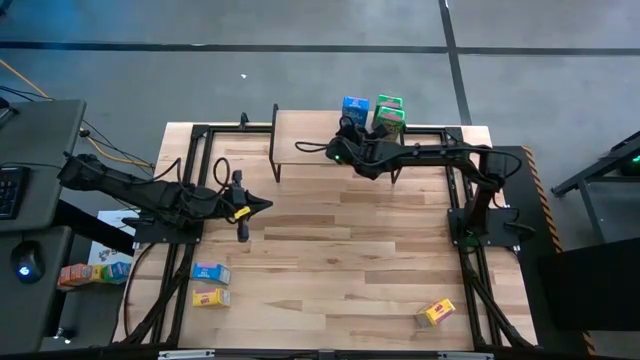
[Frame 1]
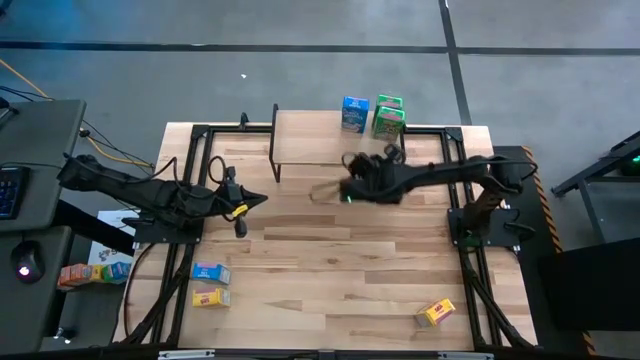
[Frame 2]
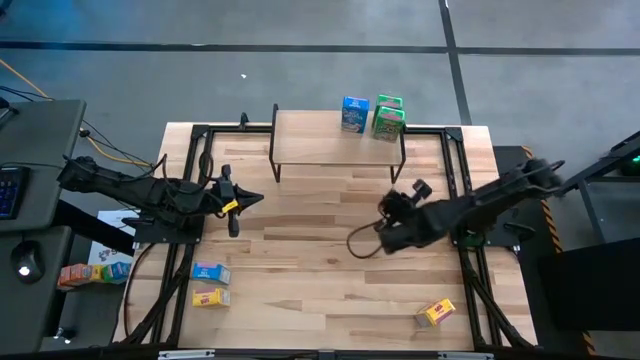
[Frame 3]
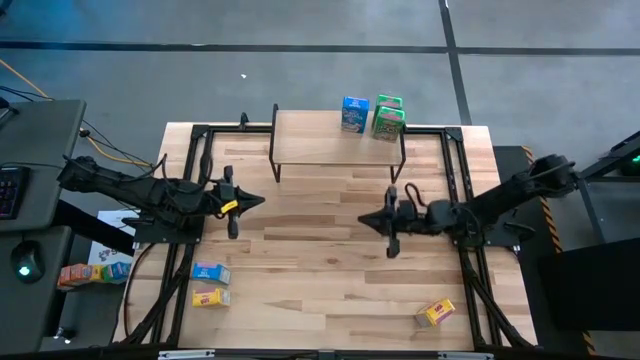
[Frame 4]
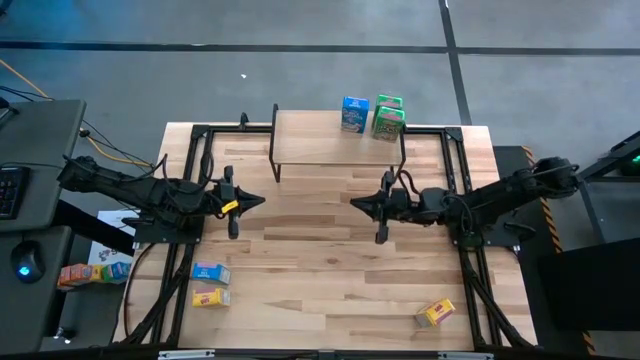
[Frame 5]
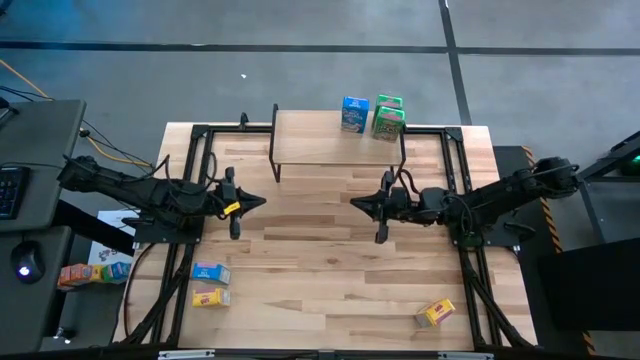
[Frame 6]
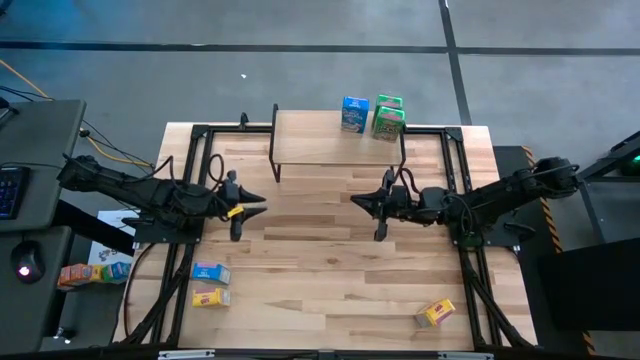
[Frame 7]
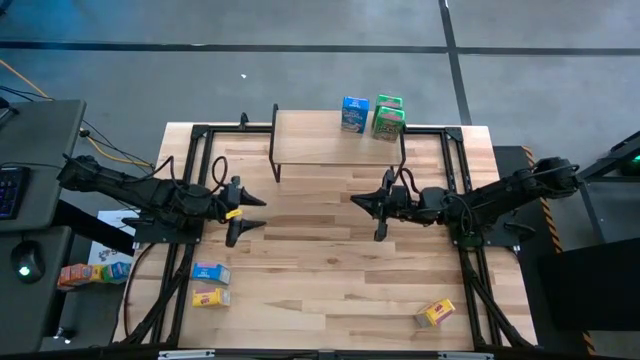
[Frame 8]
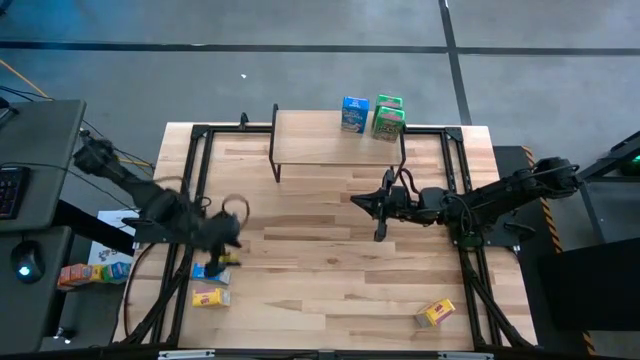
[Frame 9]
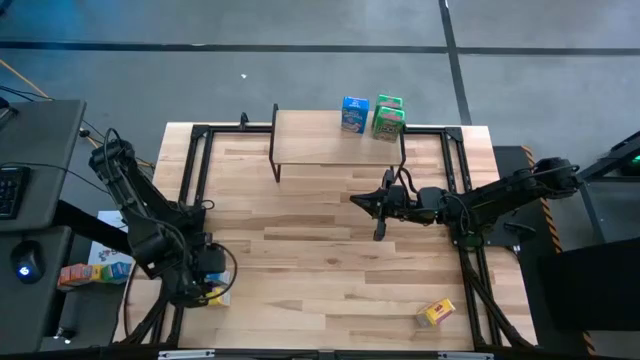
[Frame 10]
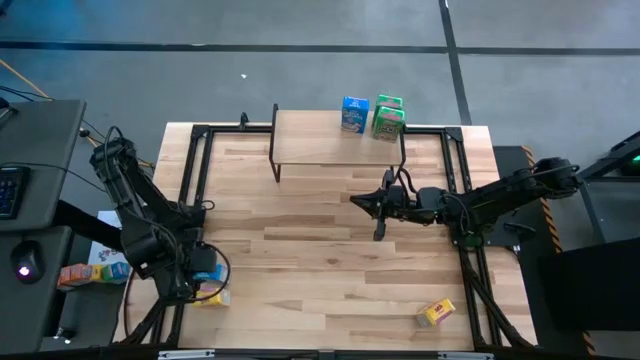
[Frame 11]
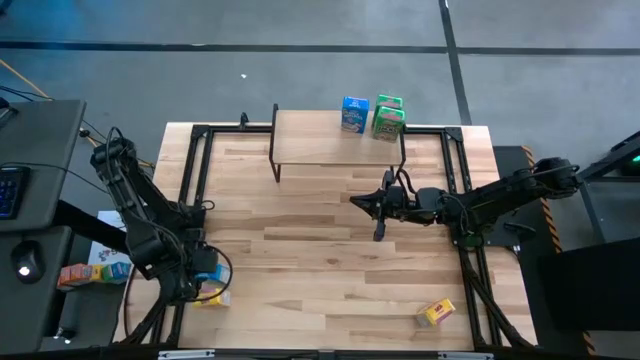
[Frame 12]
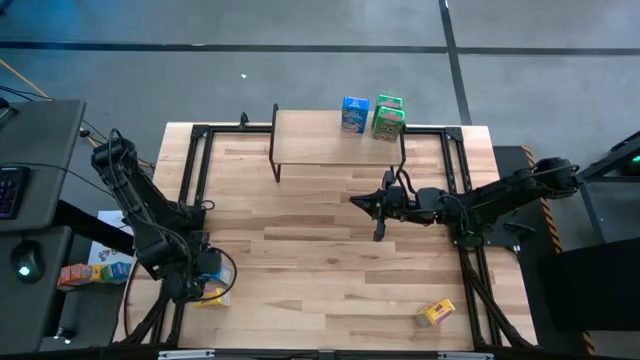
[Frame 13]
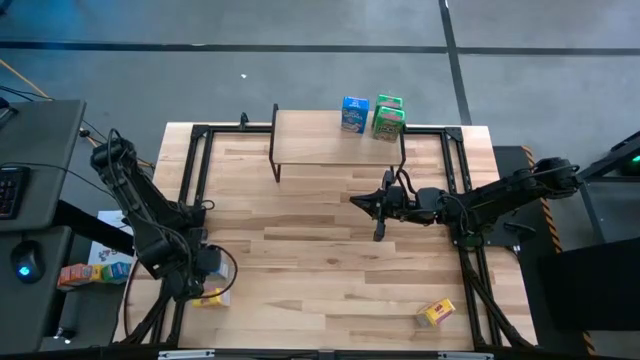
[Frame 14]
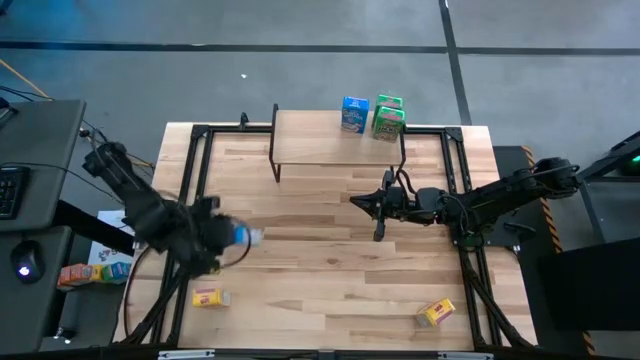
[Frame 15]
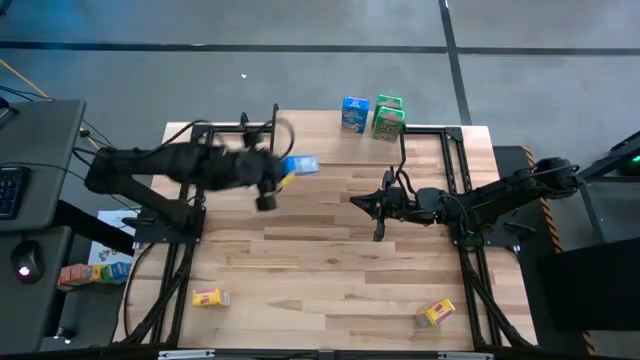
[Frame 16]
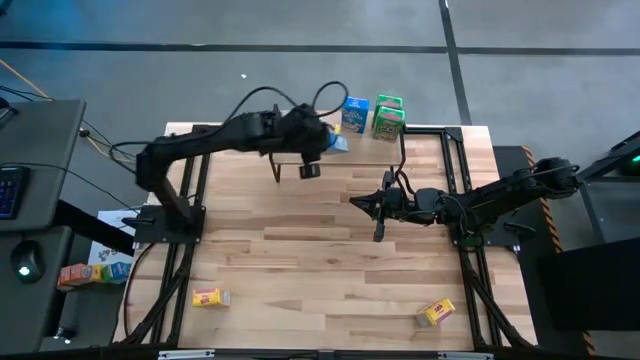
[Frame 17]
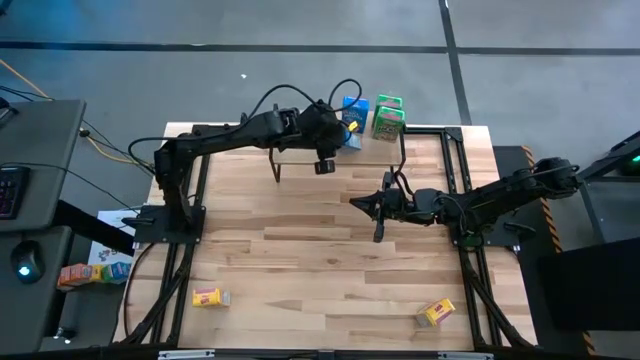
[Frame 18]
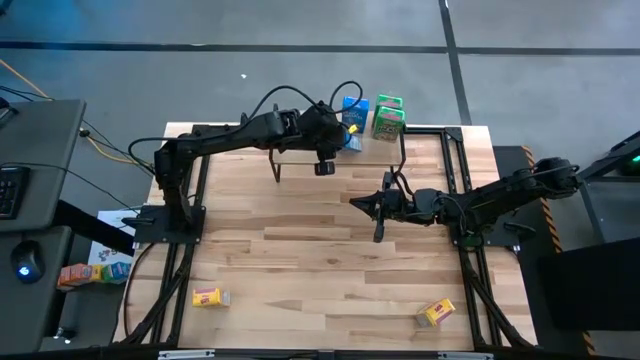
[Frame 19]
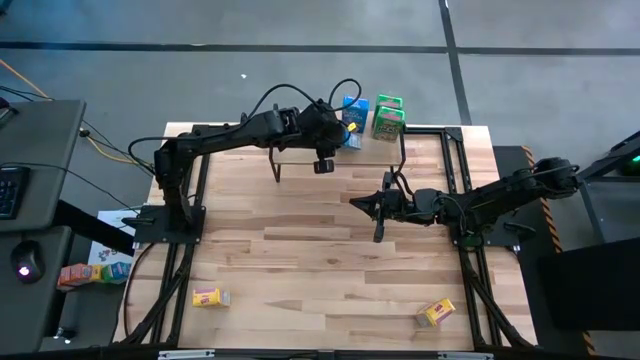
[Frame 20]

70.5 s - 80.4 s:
Task: Stack cereal on shelf
Put the blue cereal box on the shelf

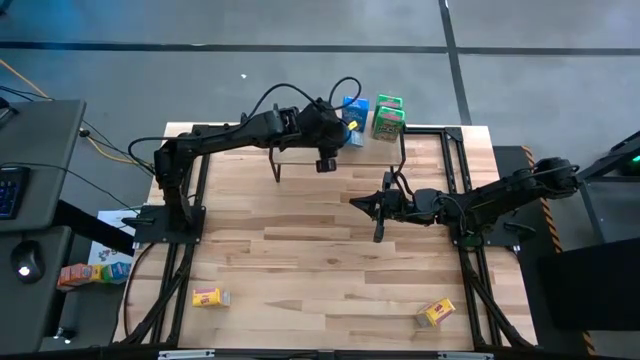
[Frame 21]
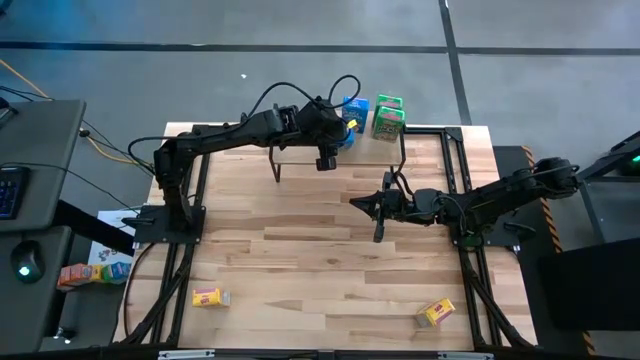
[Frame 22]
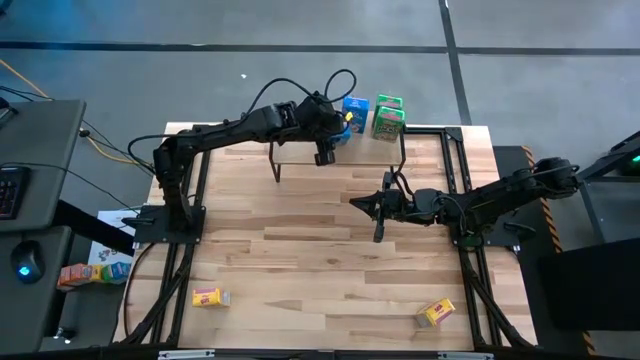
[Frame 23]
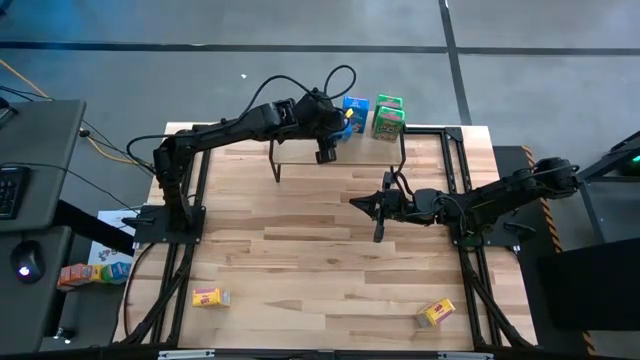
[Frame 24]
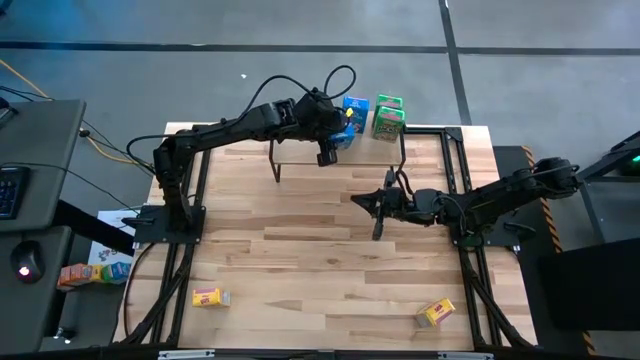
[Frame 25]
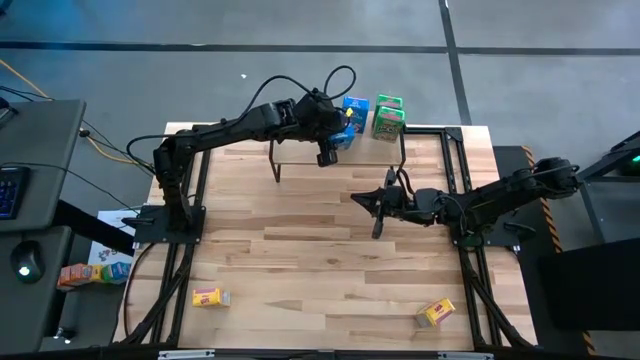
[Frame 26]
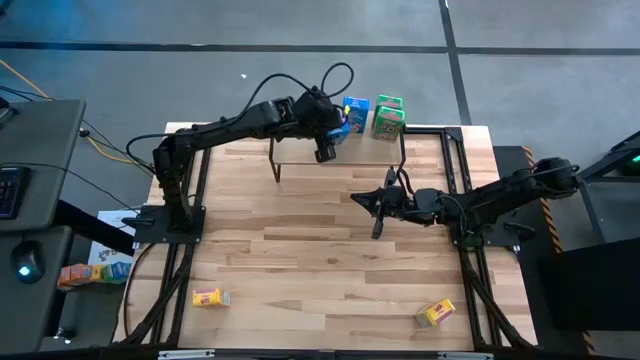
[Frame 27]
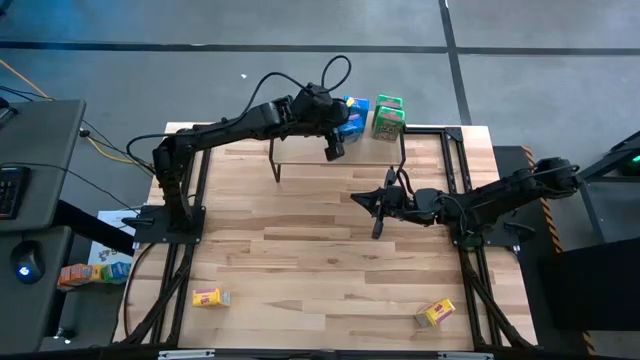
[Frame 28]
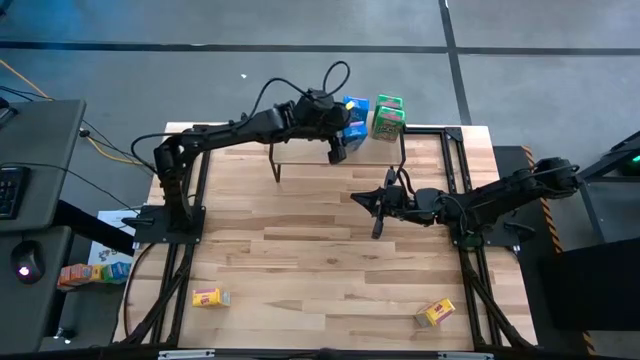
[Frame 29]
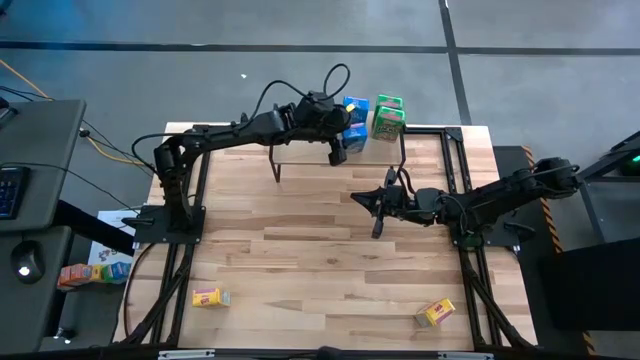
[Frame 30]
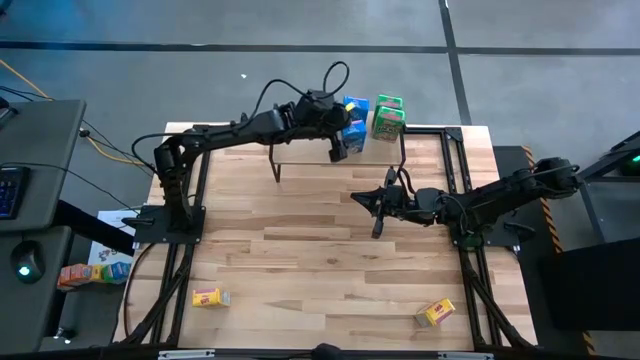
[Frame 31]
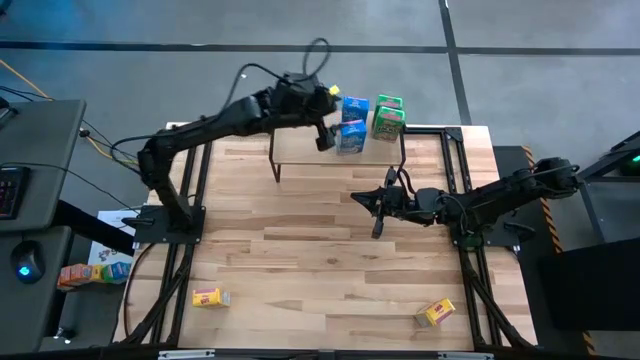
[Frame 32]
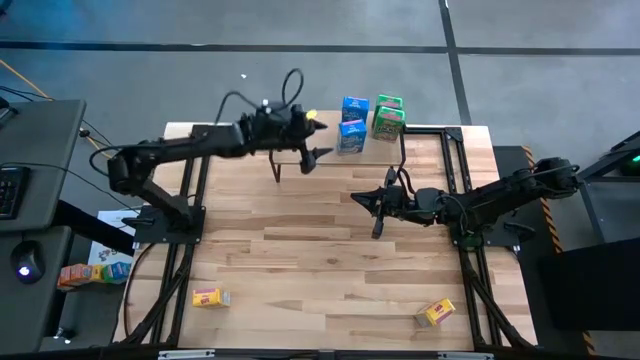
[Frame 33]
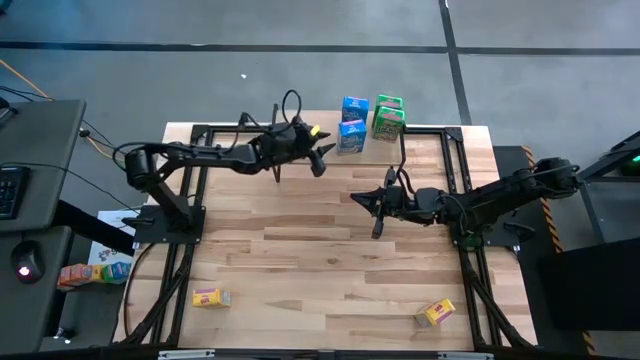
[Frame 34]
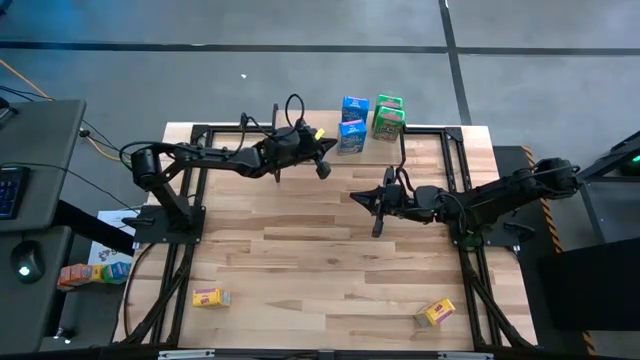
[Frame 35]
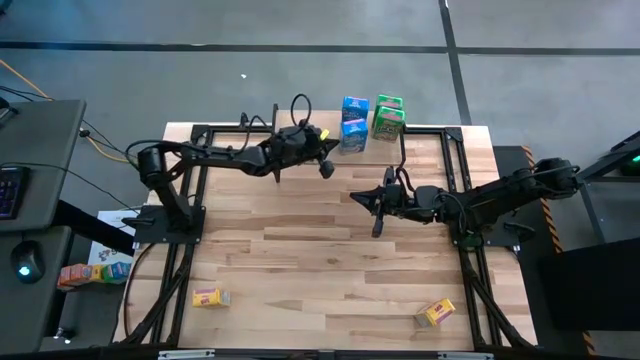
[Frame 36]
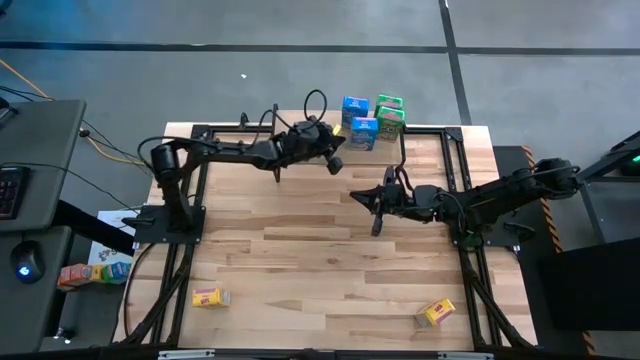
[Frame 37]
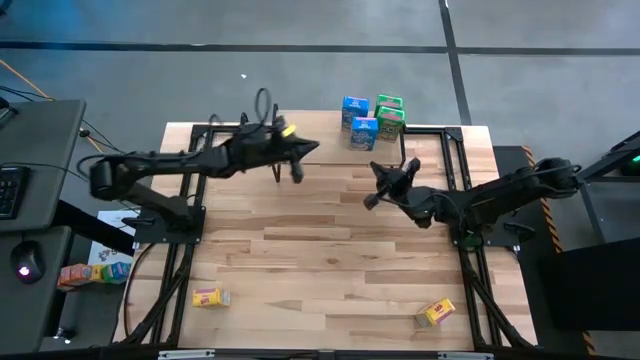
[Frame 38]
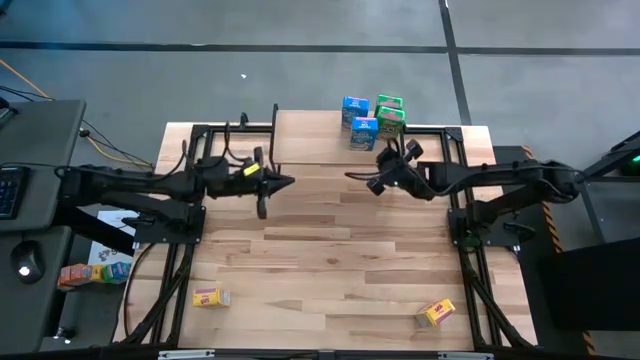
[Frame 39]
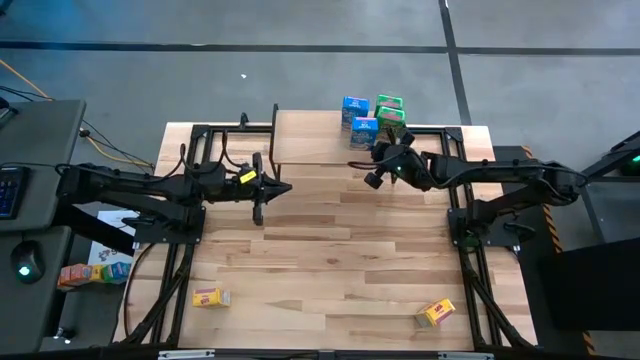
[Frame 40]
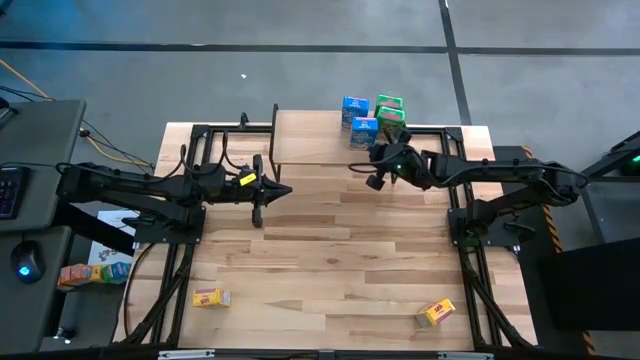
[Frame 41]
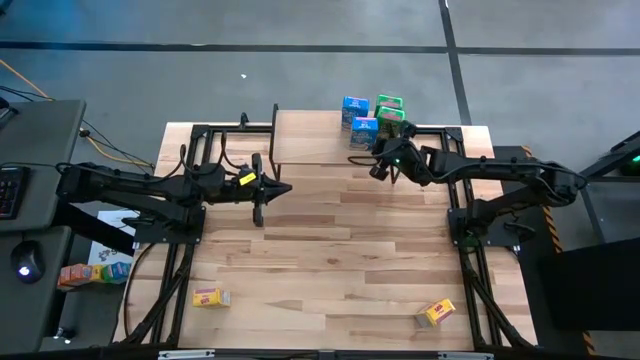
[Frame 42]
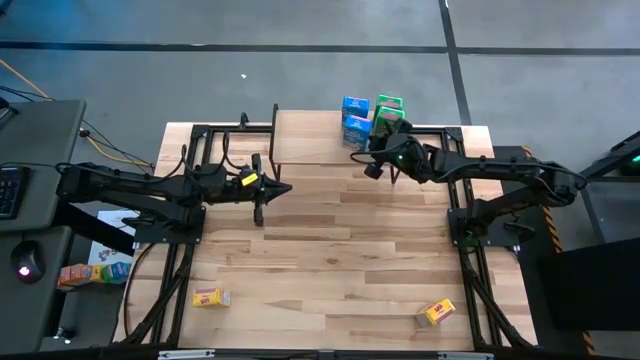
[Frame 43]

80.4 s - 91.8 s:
Adjust the bottom blue cereal box to be aligned with the other blue cereal box
